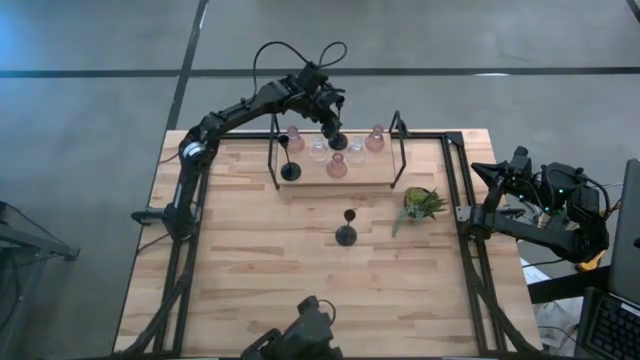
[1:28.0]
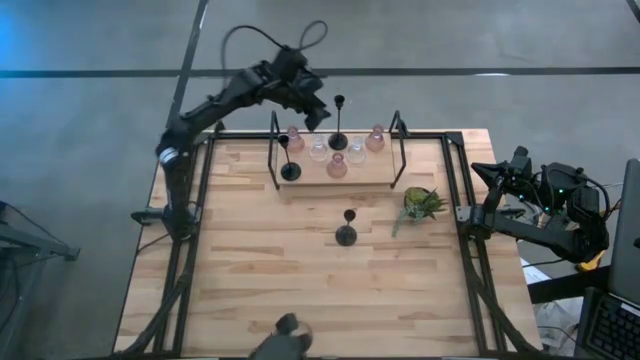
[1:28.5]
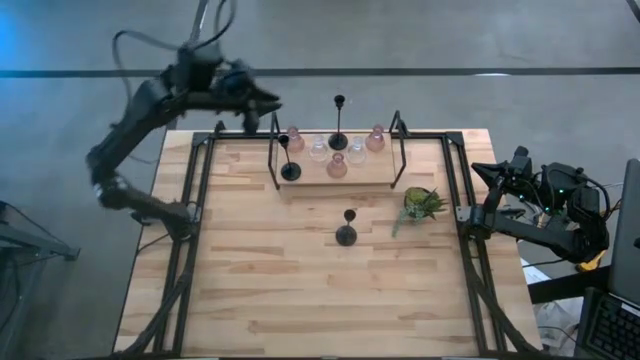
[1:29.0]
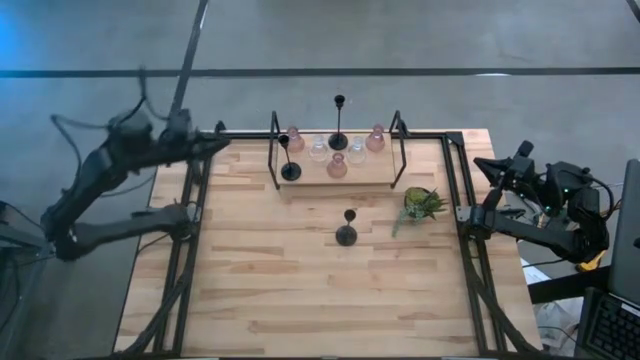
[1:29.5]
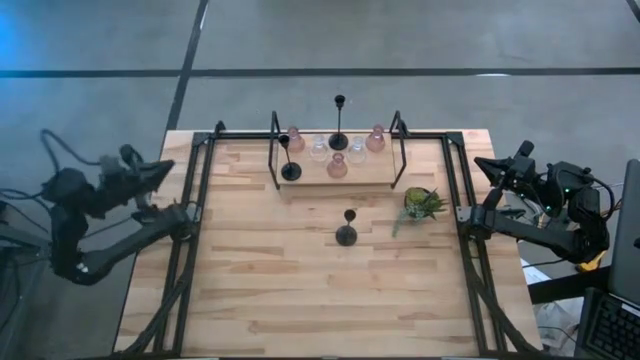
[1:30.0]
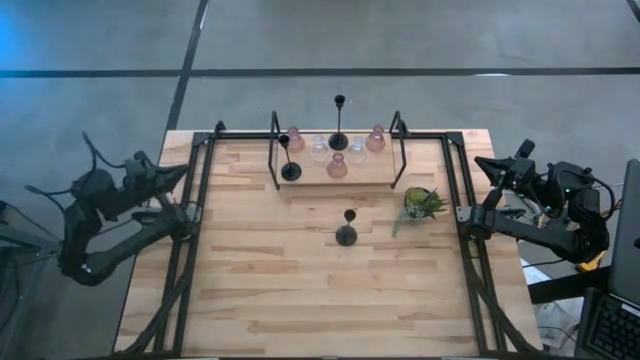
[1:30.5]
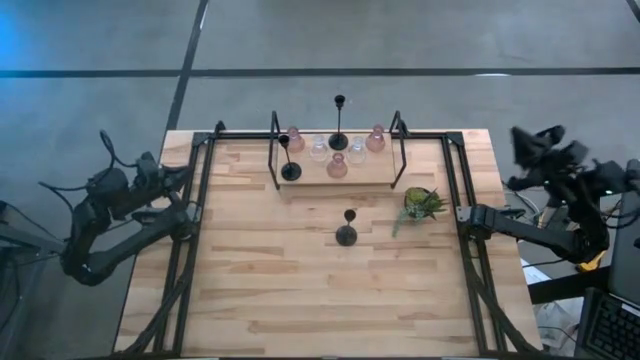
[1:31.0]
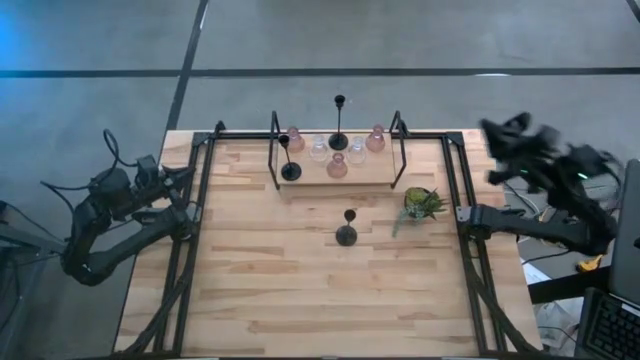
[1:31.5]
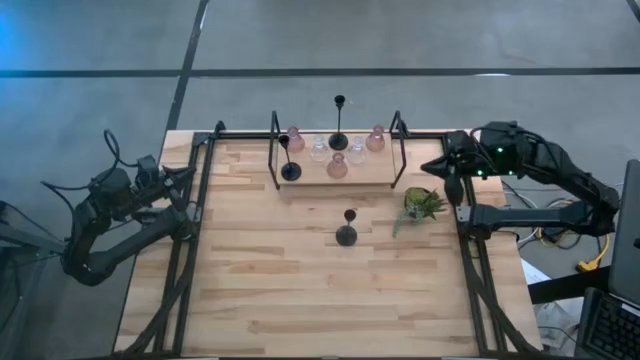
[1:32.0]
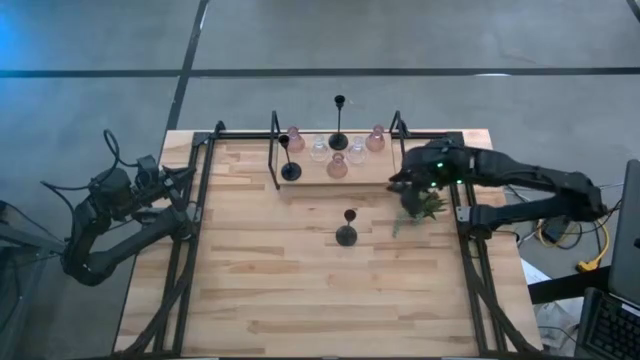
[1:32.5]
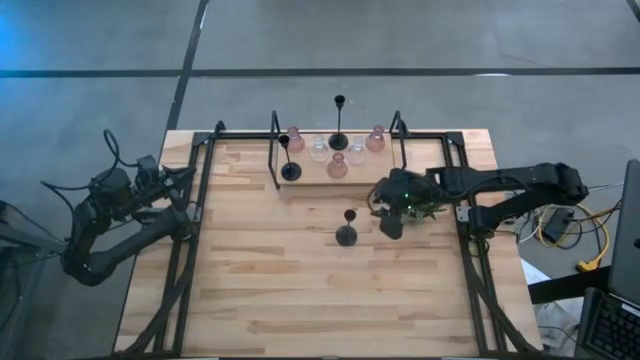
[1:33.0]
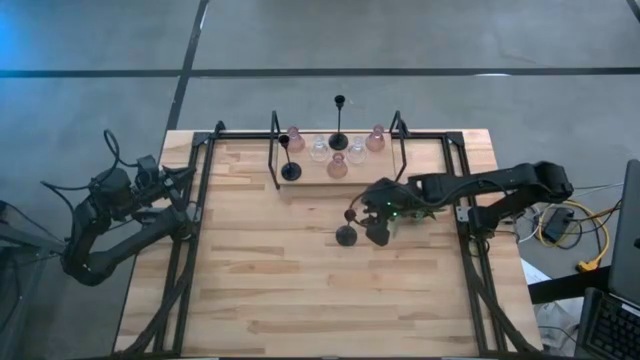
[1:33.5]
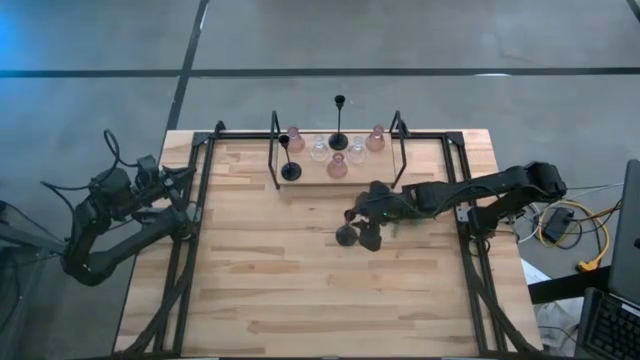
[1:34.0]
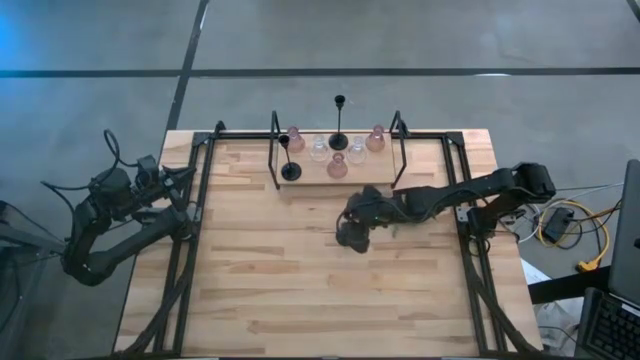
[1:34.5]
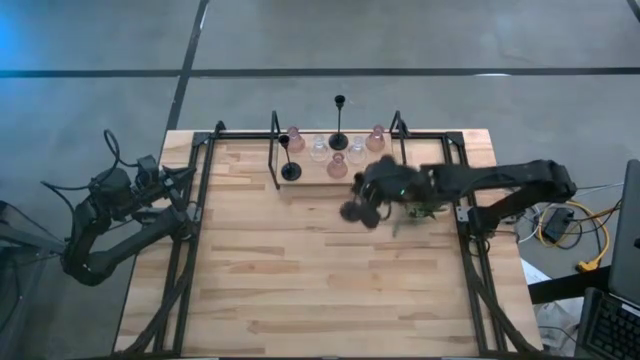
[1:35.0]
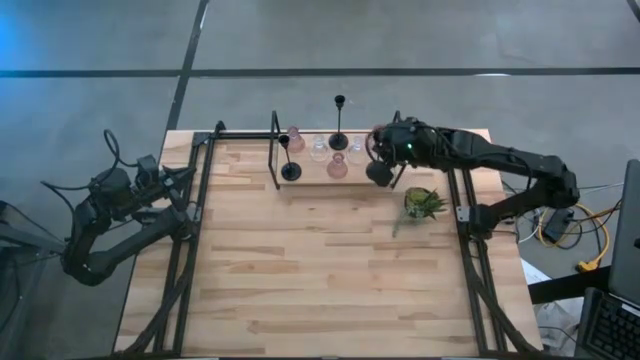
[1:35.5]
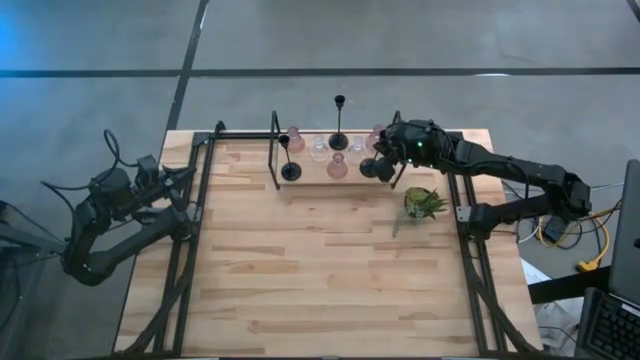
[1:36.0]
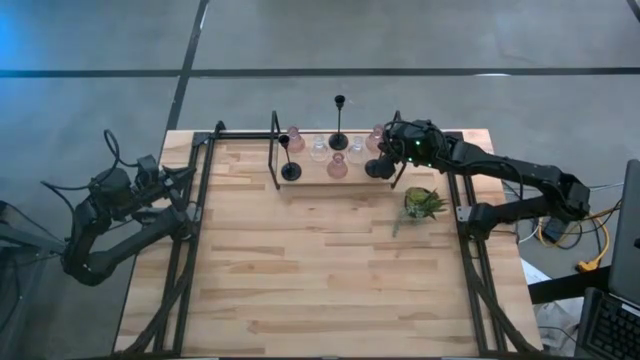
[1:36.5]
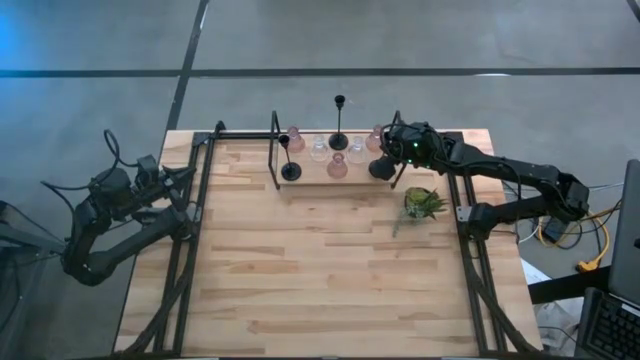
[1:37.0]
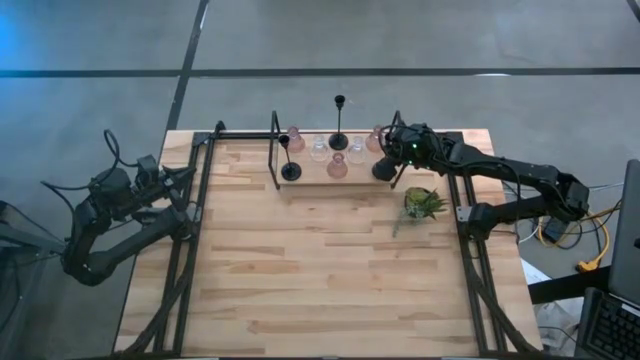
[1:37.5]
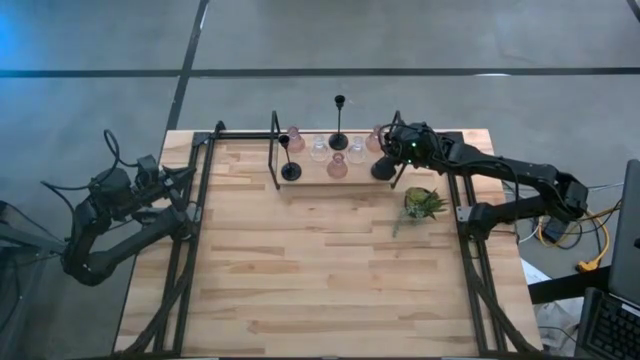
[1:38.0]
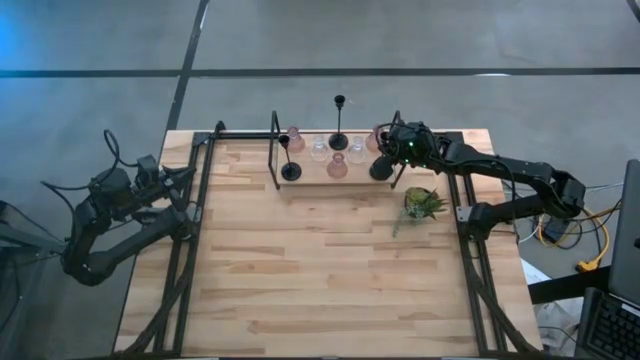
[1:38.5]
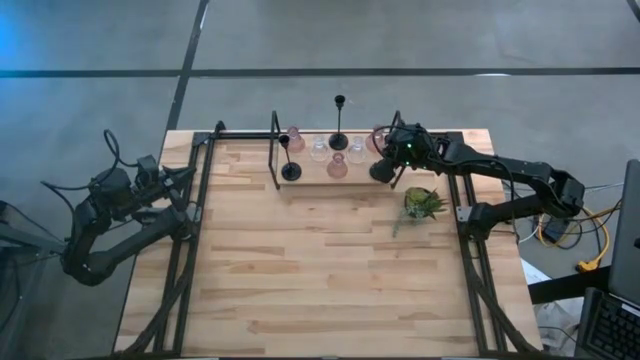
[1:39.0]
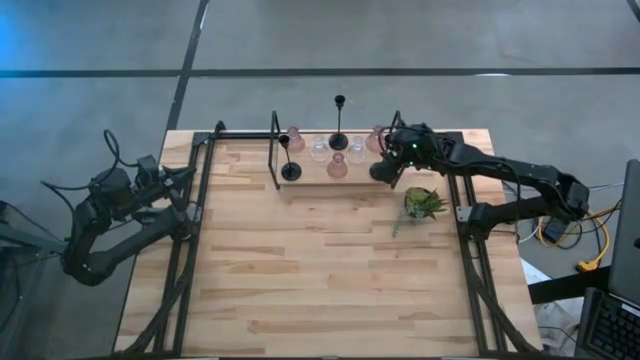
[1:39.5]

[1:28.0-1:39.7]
Task: Pick & Place candle stick holders
Put the black candle holder on the shelf aligned with the other pink glass candle holder

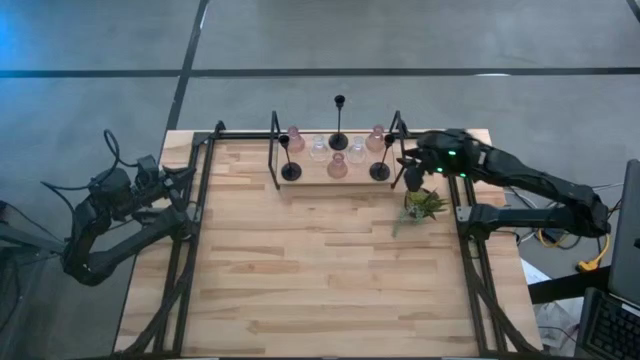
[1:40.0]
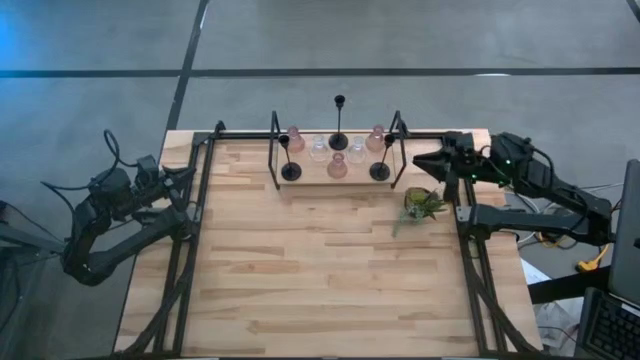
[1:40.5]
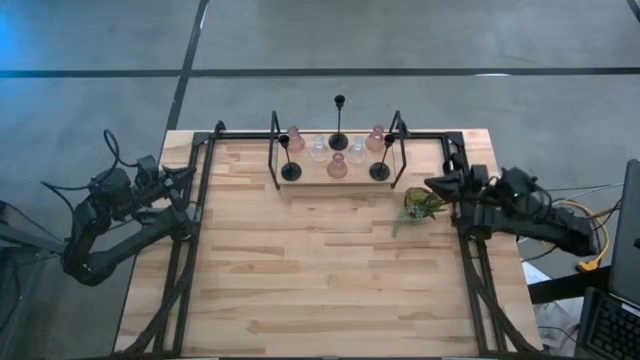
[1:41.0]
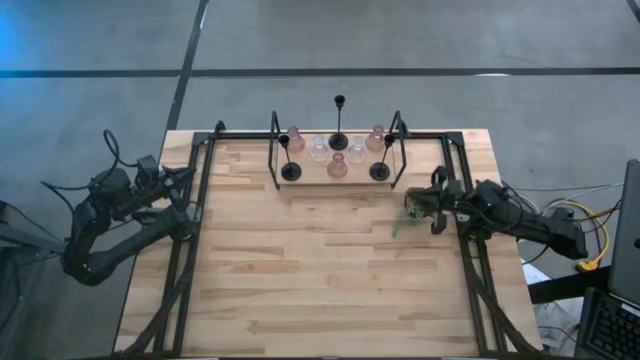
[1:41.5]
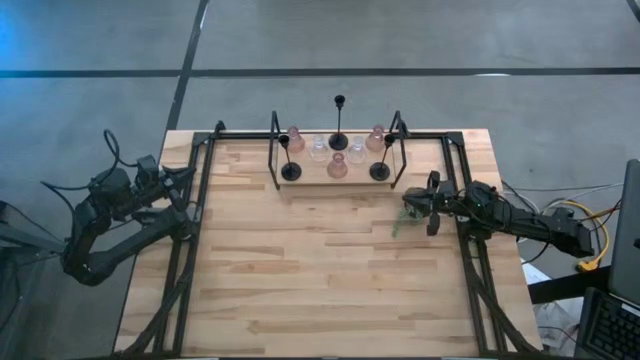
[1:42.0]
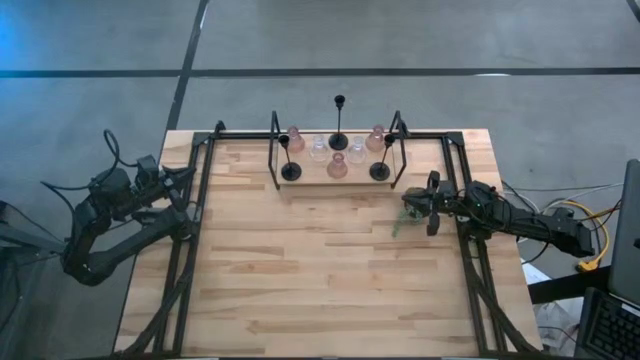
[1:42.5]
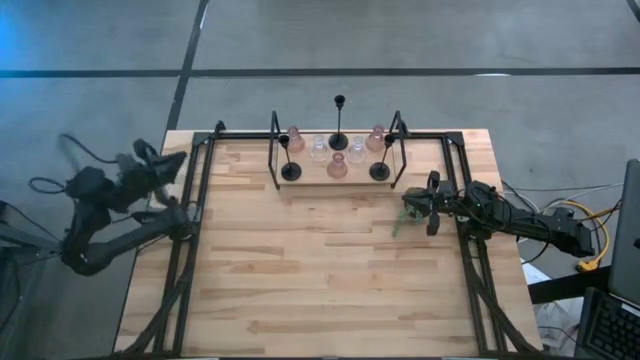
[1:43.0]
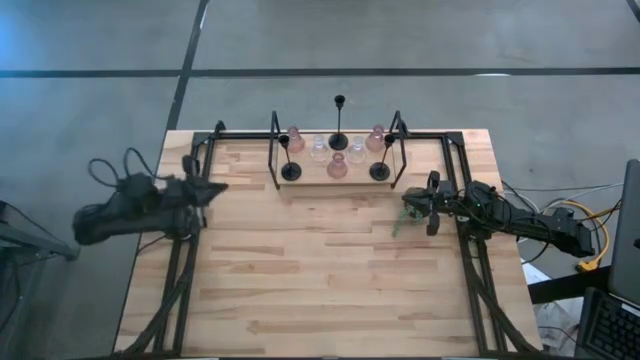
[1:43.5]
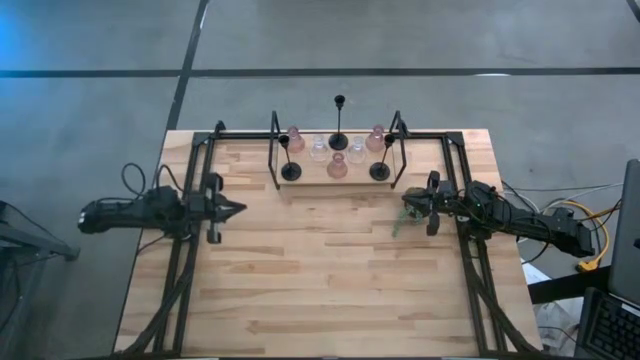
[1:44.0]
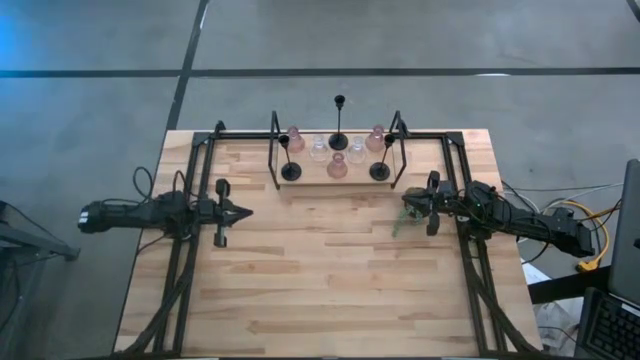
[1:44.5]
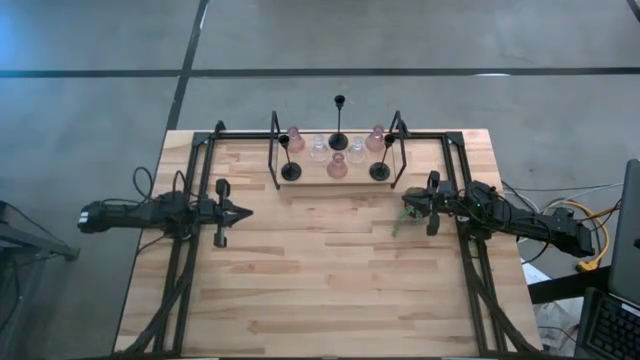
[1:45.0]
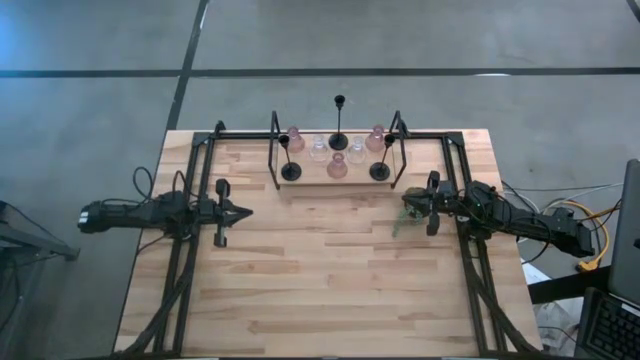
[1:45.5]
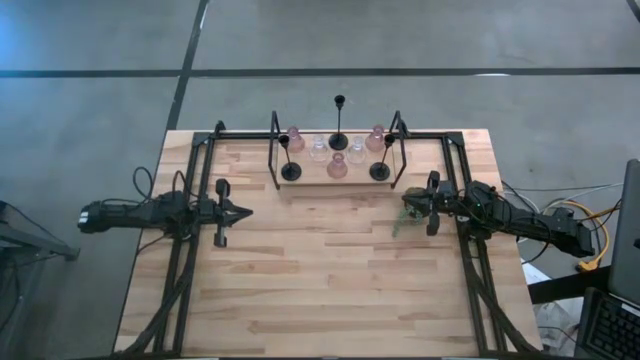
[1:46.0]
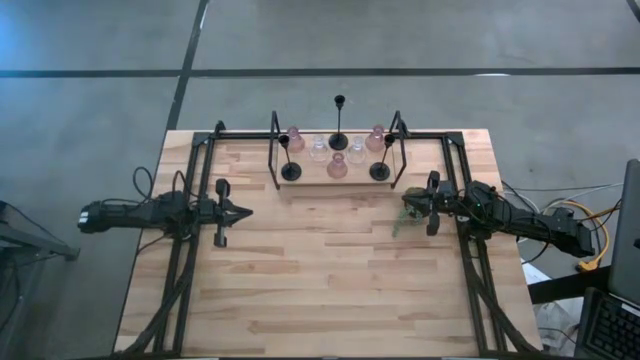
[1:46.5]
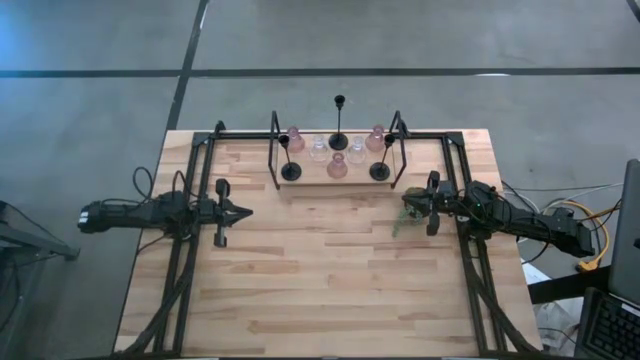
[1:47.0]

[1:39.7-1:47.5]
Return to Home Position

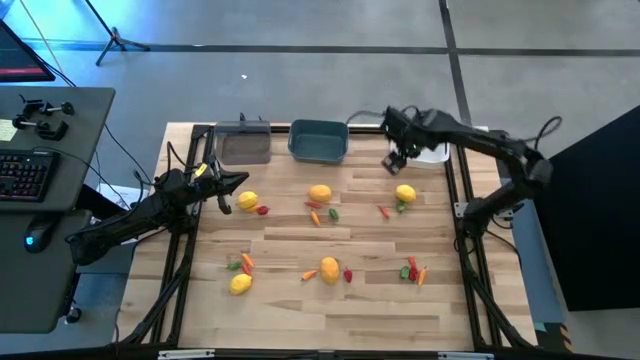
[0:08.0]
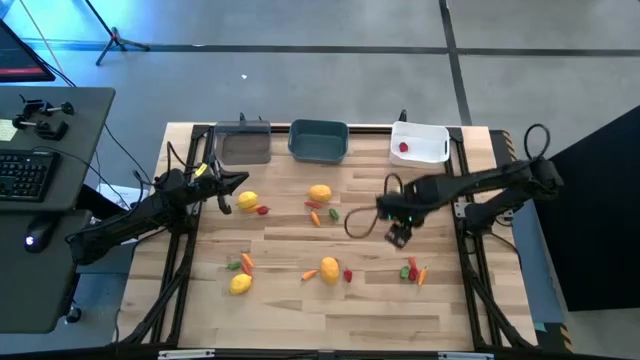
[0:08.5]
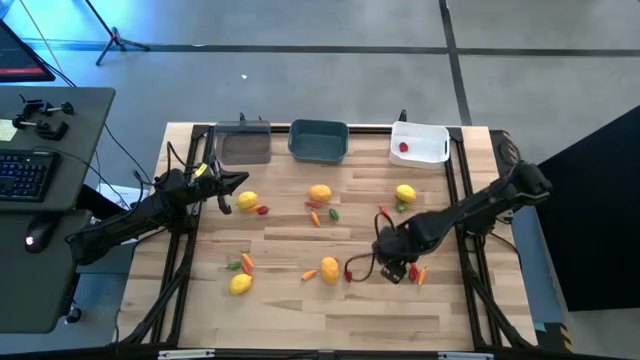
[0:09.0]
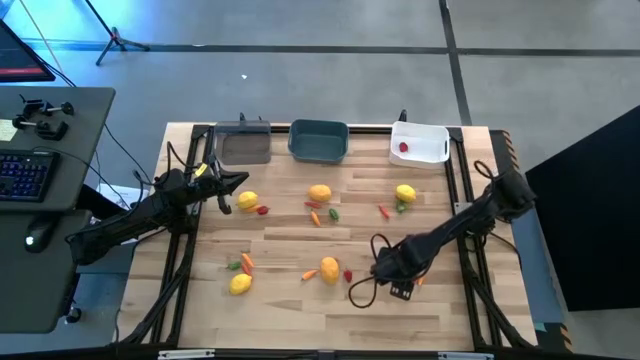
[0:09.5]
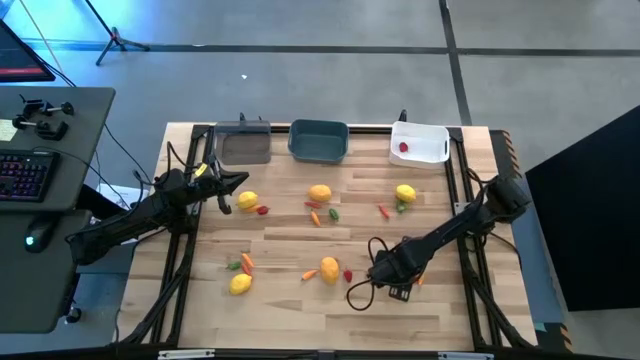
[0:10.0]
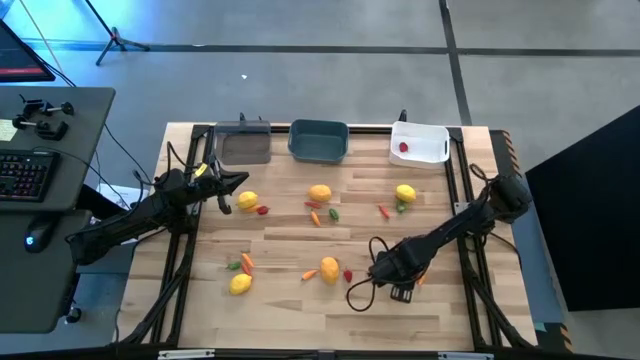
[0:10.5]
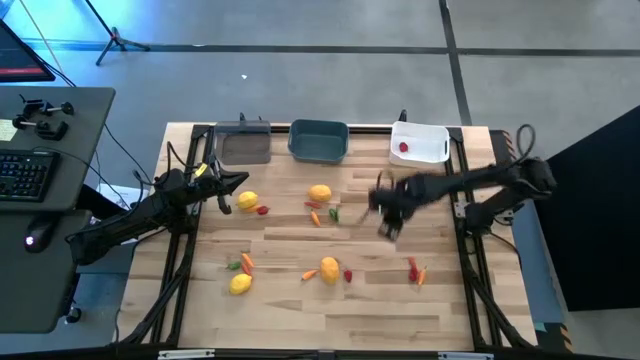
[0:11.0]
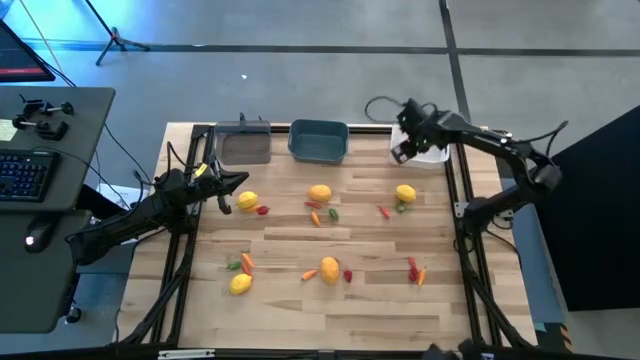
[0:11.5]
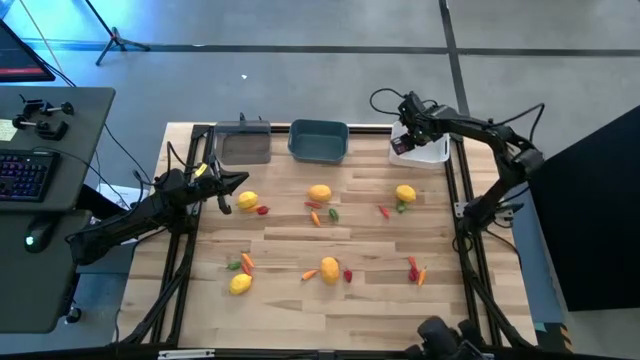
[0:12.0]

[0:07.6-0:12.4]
Task: Sort produce into baskets
Put the green chili pepper into the white bin
